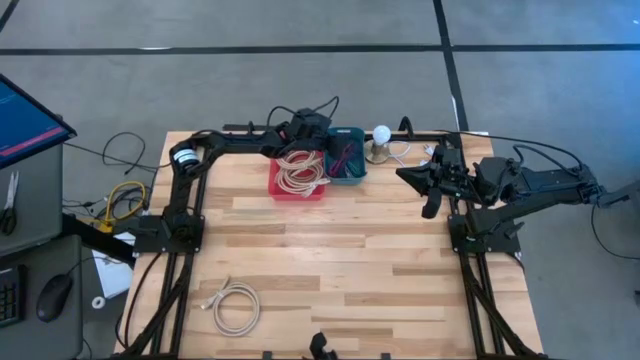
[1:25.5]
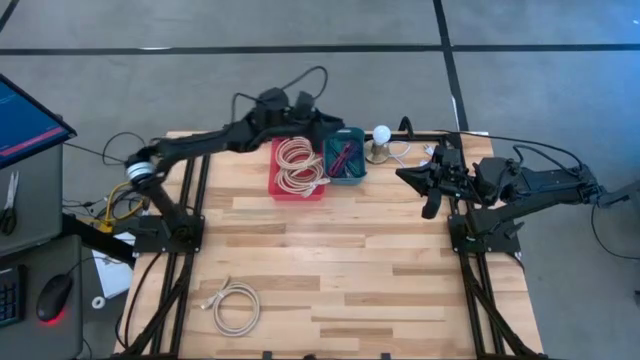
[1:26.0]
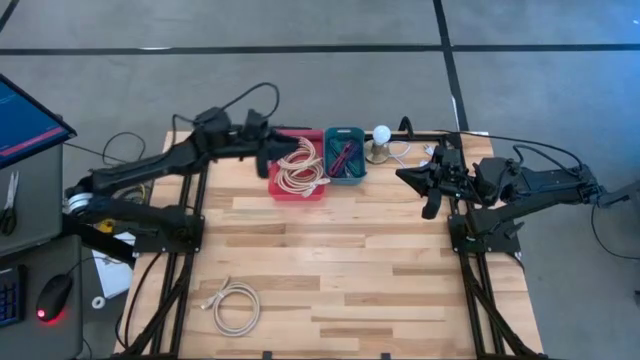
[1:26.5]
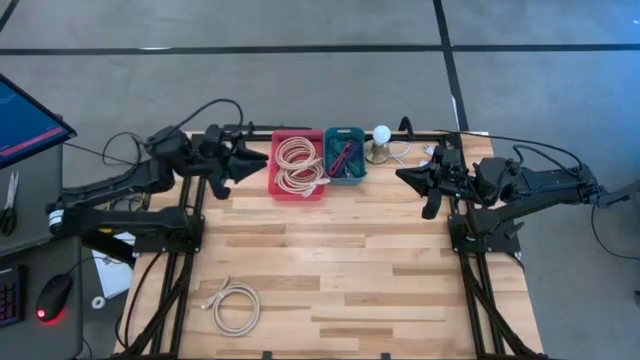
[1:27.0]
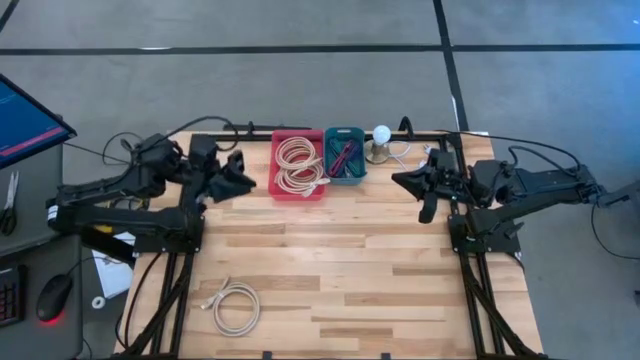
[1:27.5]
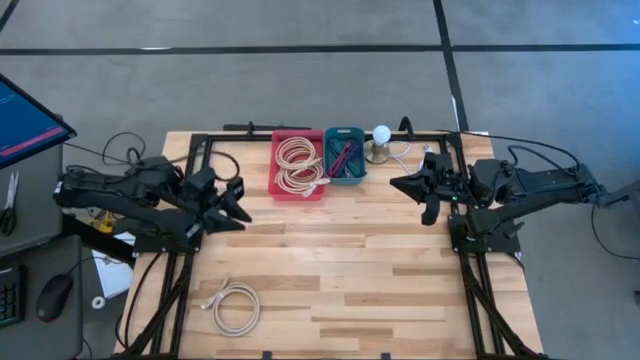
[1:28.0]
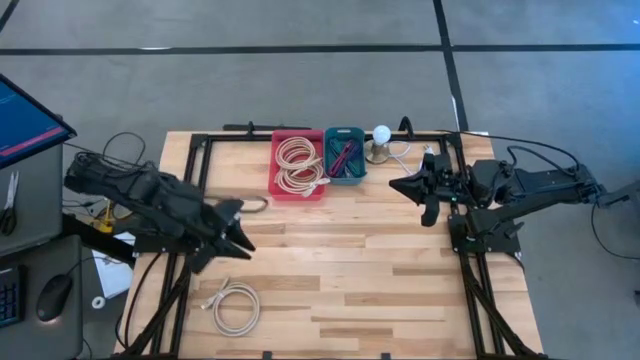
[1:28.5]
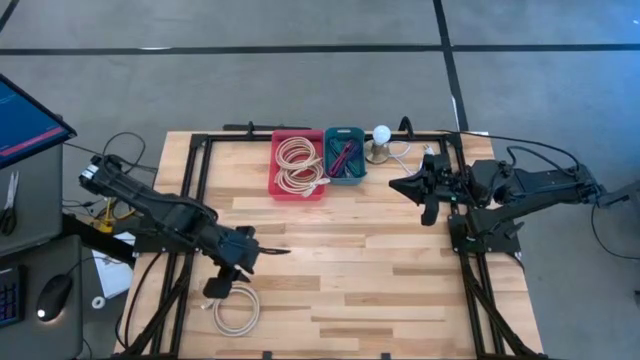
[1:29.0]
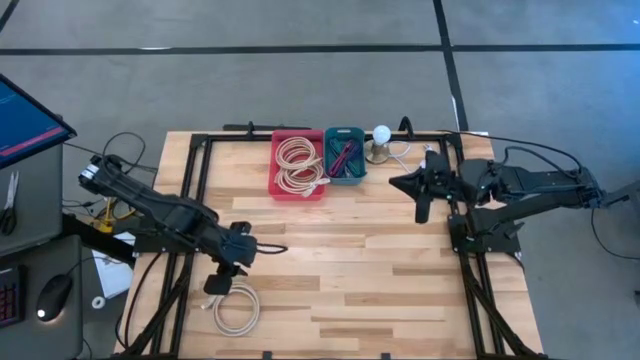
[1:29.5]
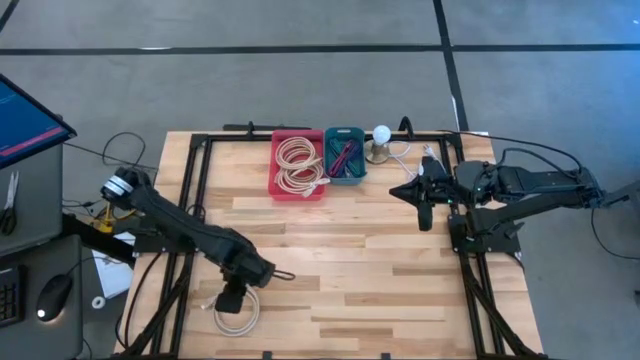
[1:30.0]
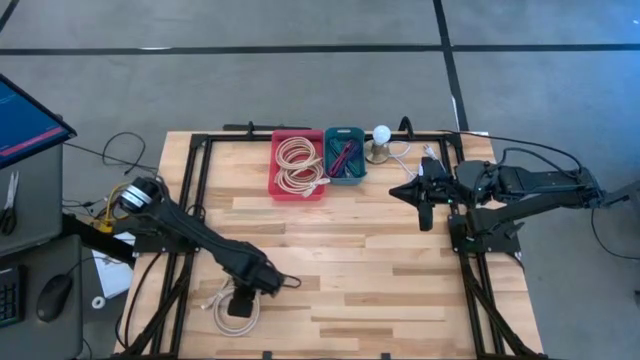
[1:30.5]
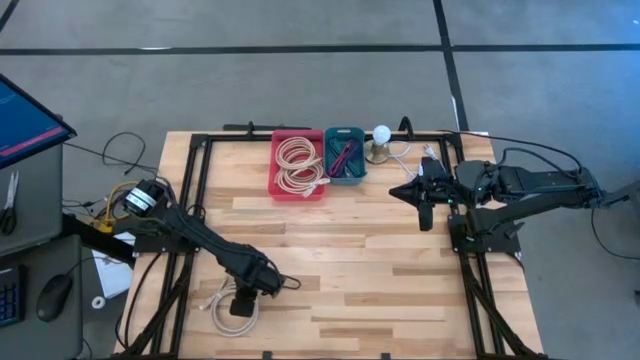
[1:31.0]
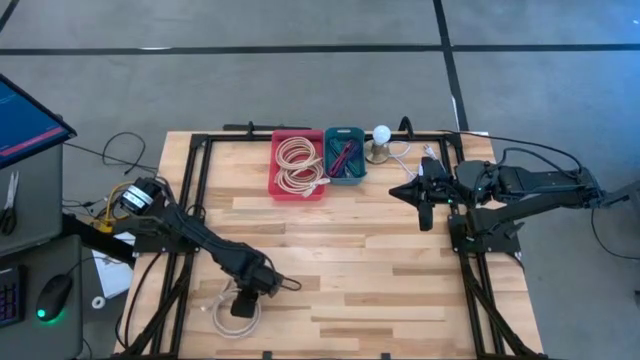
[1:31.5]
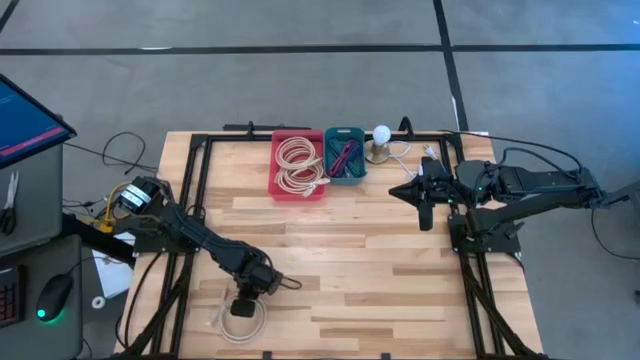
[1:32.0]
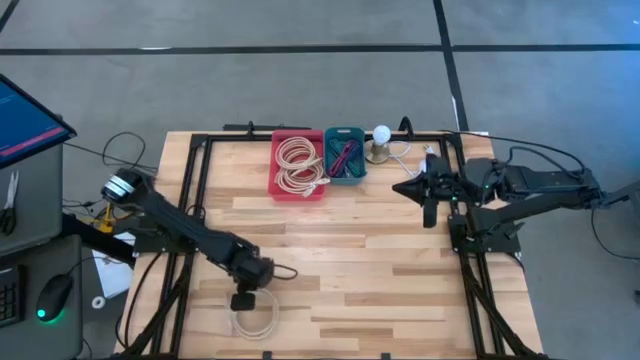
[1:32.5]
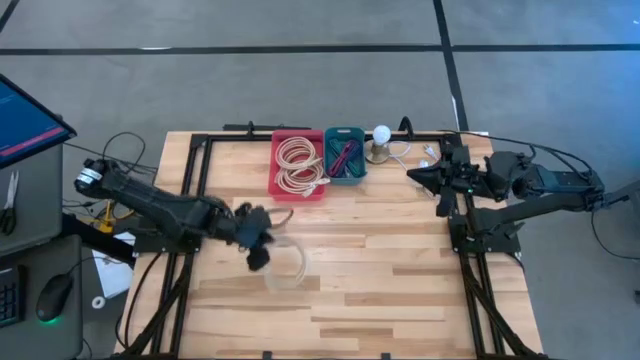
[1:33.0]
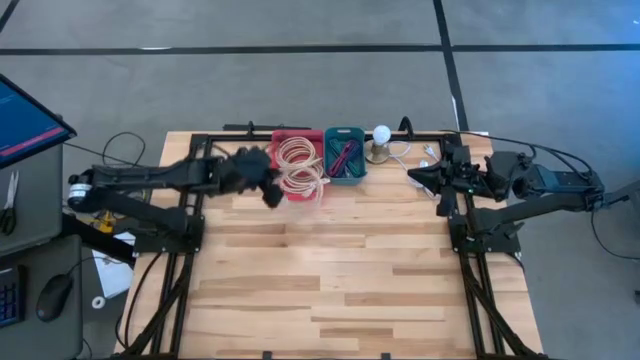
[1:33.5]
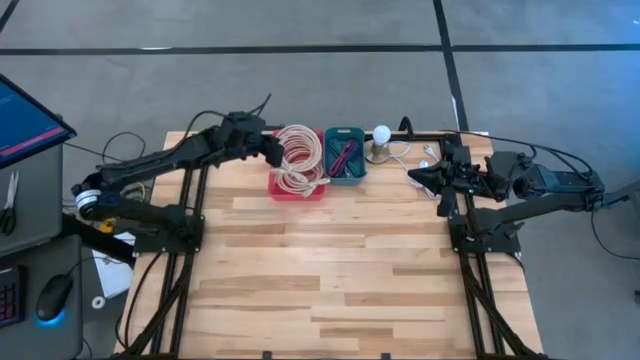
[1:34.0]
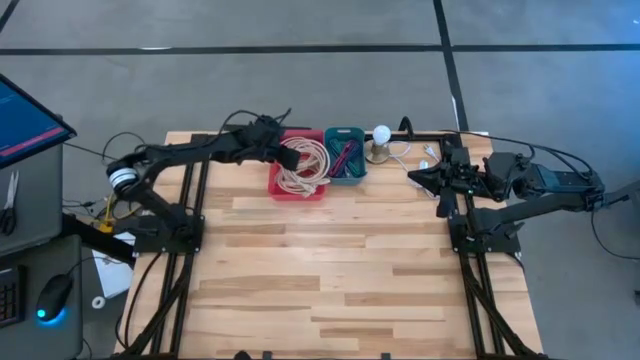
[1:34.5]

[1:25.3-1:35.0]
Task: Pick & Place USB Port
Put the light brown HDMI cable into the pink bin

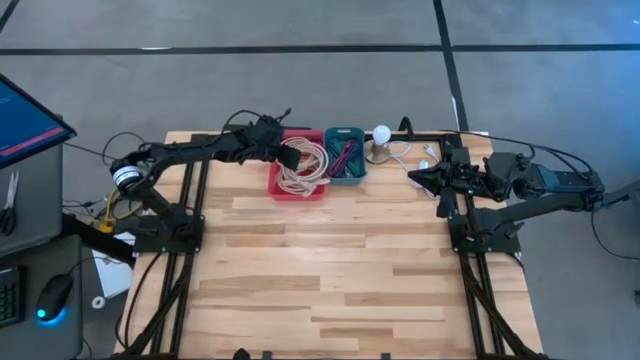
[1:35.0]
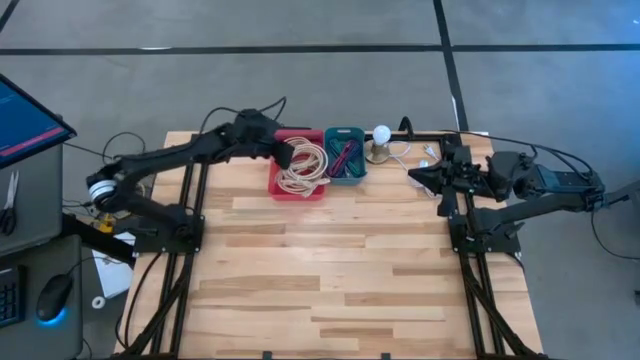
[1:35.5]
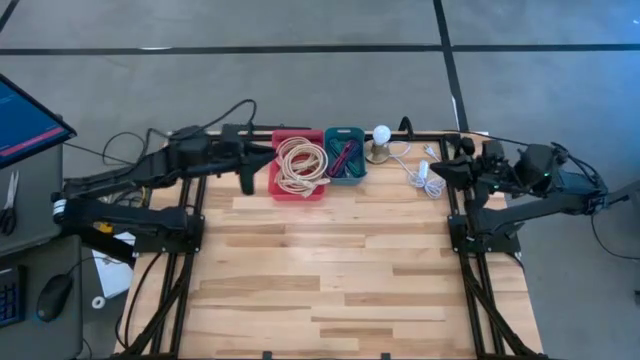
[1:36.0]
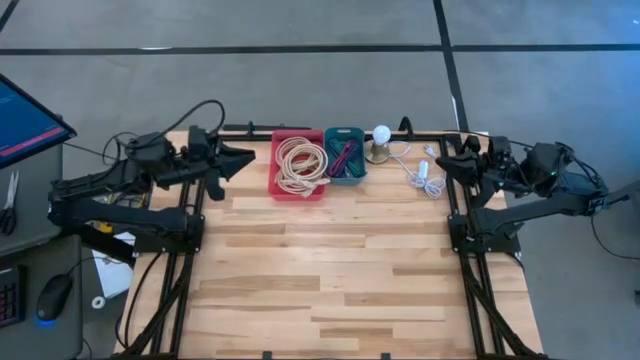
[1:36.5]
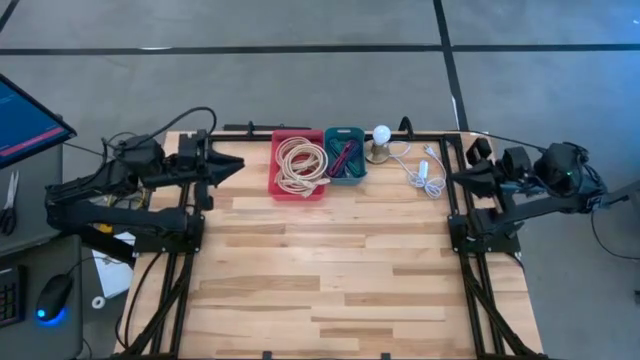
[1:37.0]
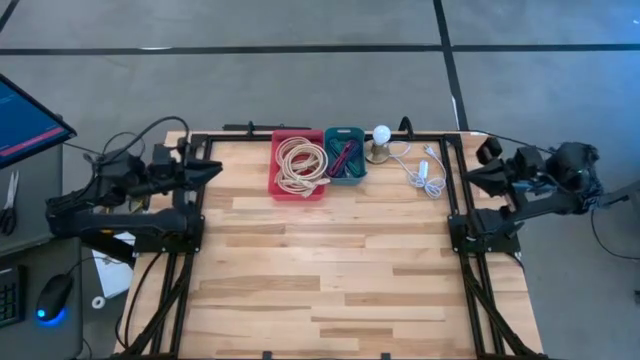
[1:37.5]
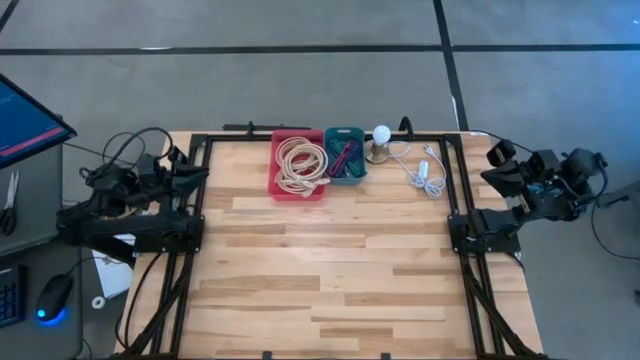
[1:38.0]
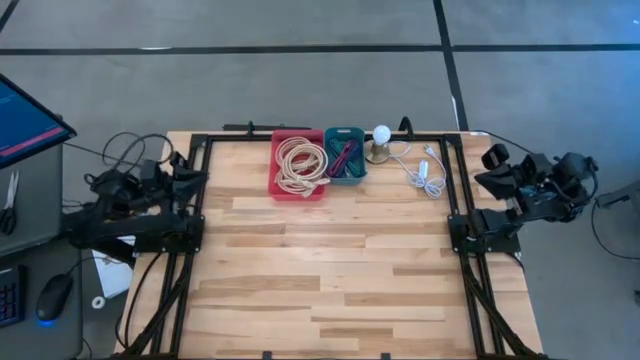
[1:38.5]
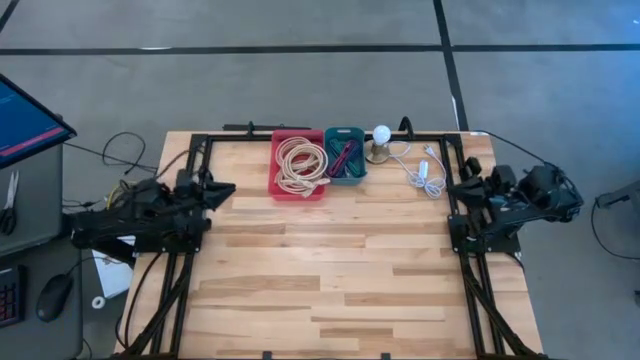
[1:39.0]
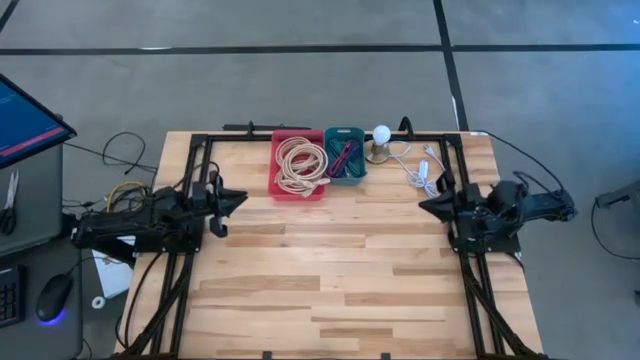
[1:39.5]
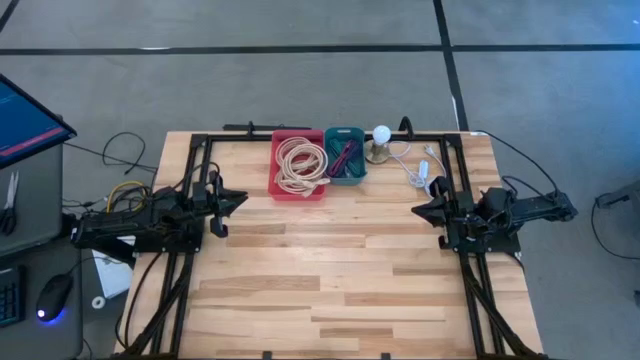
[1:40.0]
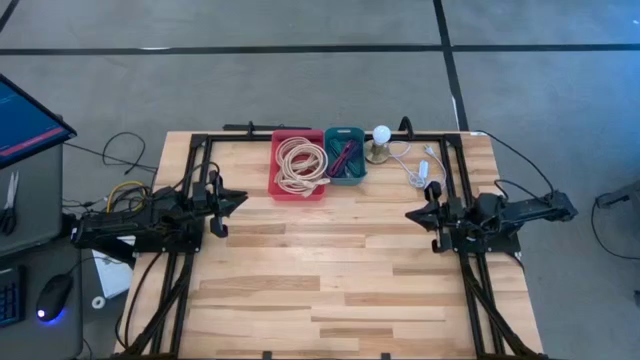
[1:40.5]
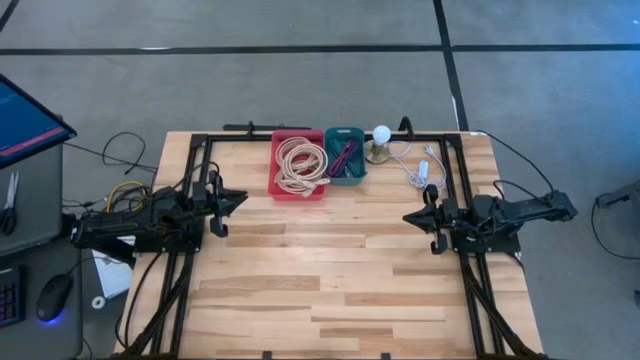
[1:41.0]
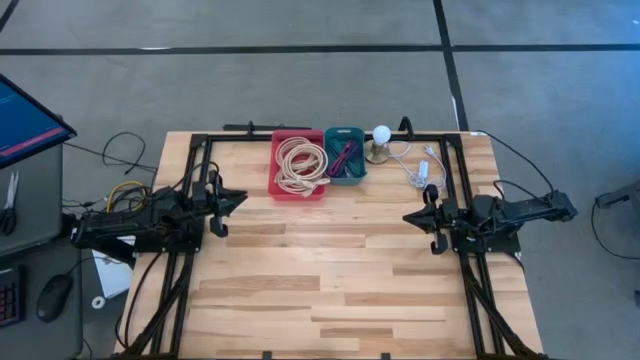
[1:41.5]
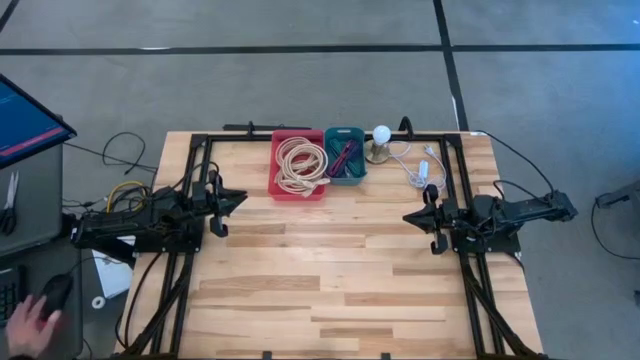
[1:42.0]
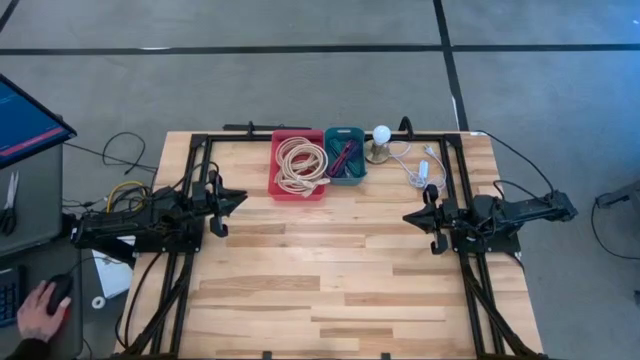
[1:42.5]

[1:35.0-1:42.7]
Return to Home Position

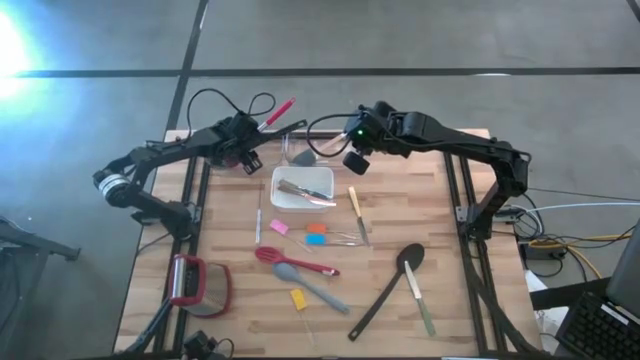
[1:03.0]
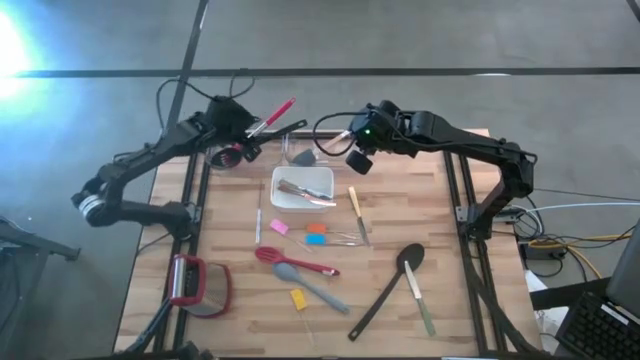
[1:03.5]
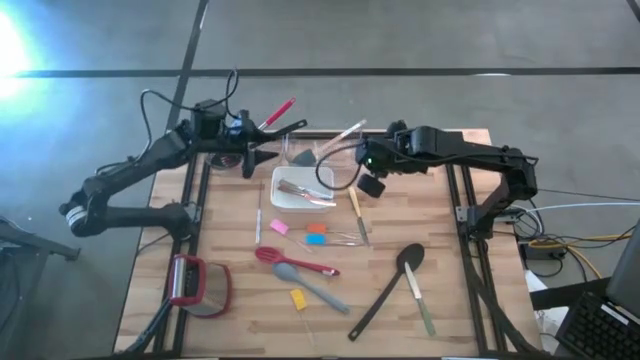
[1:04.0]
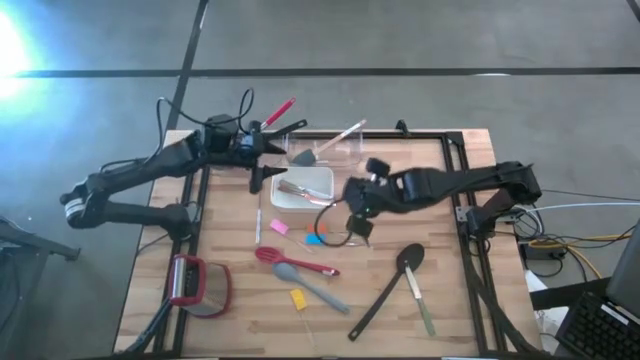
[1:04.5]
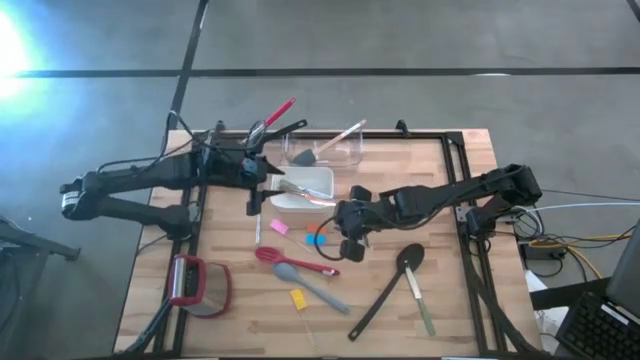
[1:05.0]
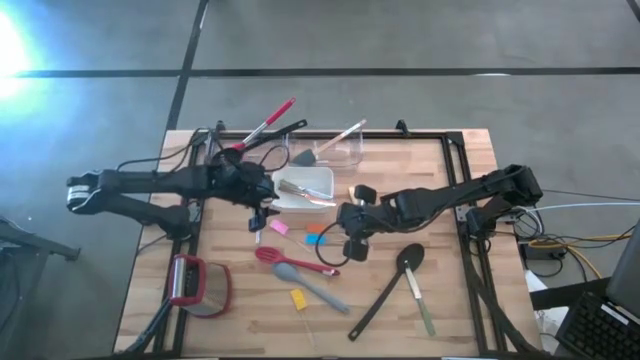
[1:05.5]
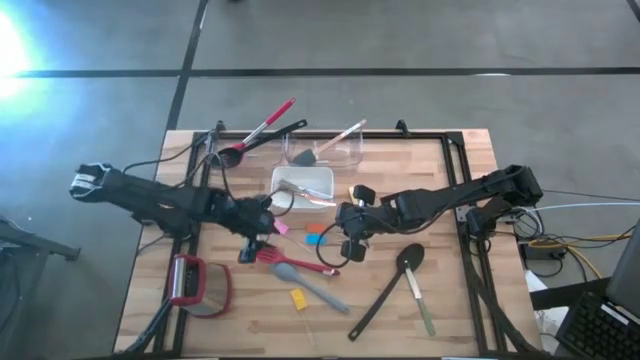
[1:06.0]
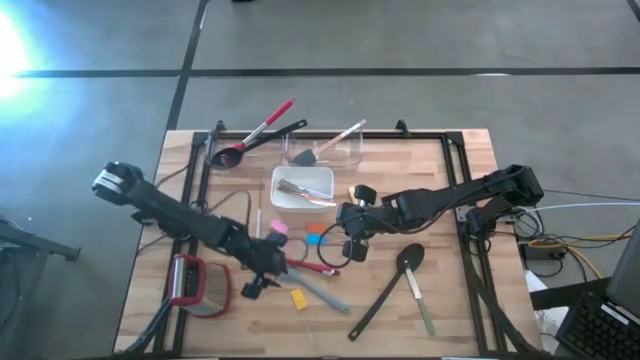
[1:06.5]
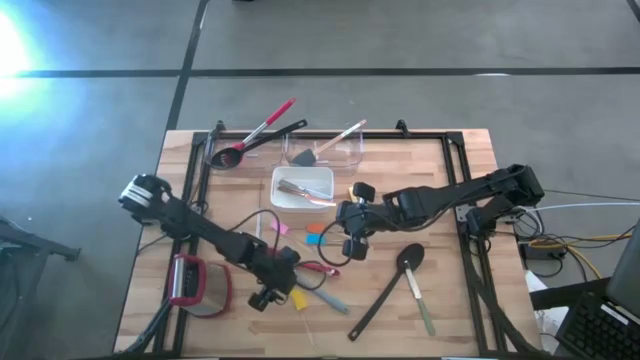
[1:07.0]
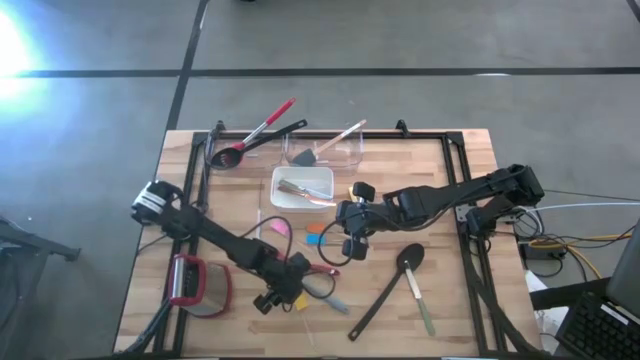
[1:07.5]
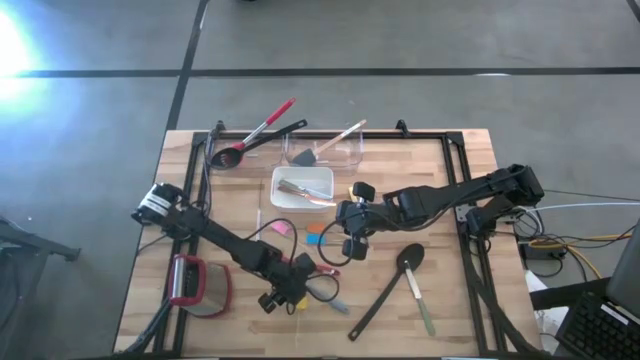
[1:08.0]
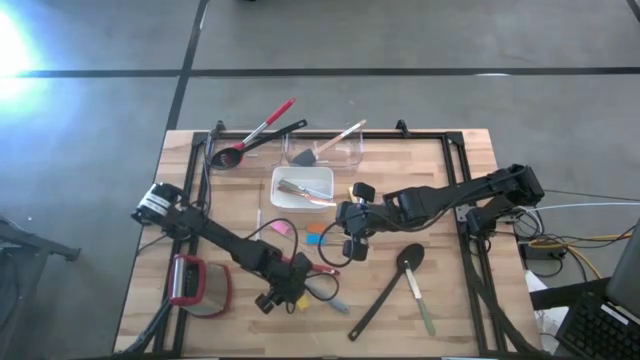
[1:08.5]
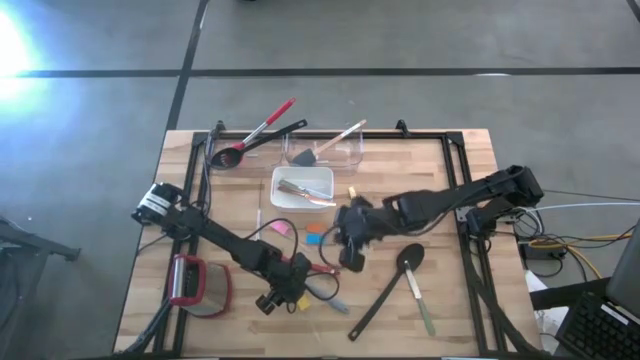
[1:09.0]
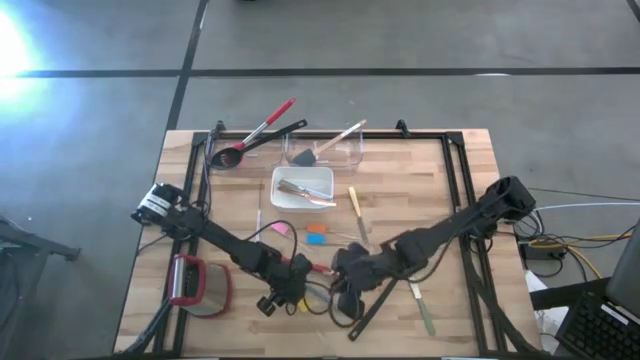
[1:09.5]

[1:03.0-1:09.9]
Task: Pick & Place Kitchen Items
Put the yellow spatula into the right transparent bin
